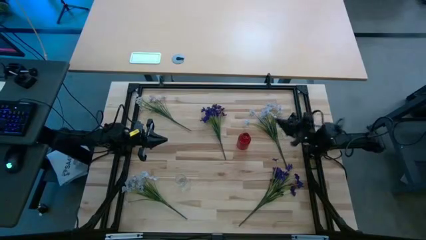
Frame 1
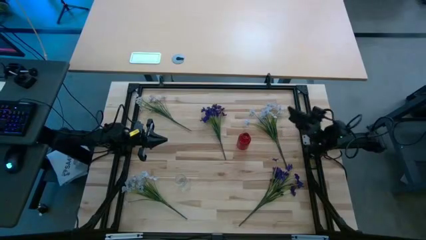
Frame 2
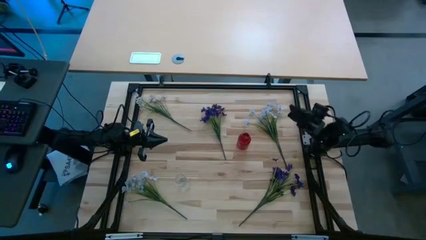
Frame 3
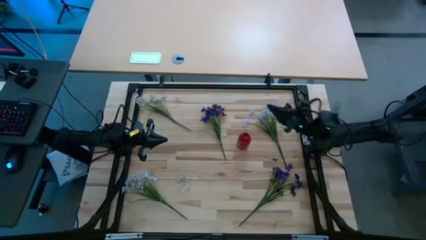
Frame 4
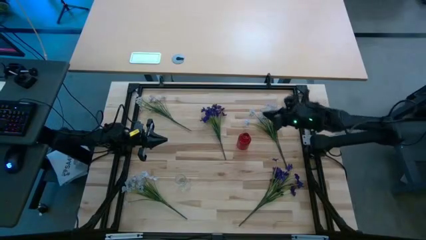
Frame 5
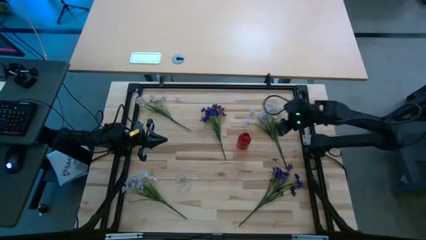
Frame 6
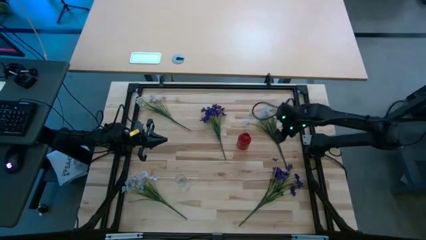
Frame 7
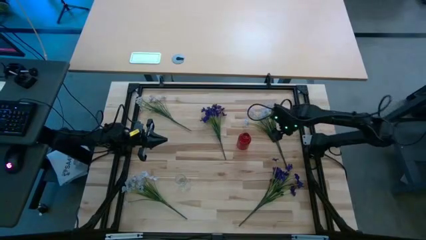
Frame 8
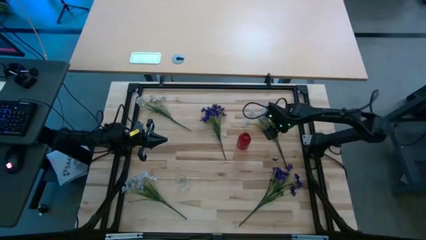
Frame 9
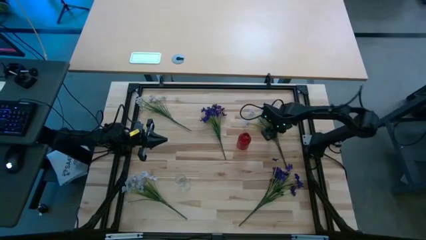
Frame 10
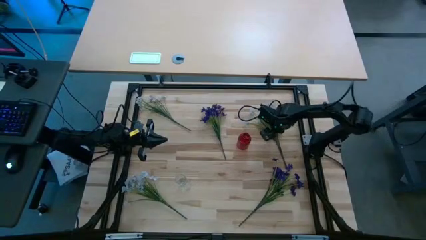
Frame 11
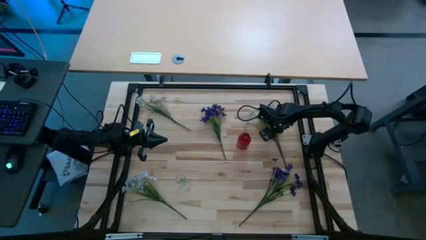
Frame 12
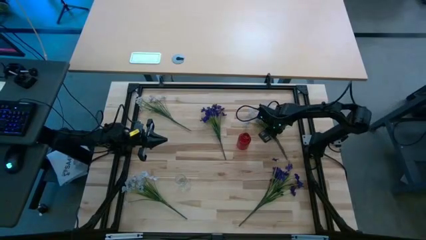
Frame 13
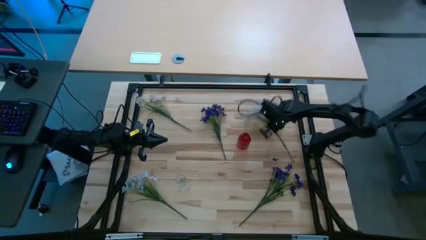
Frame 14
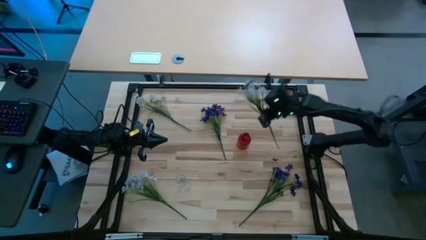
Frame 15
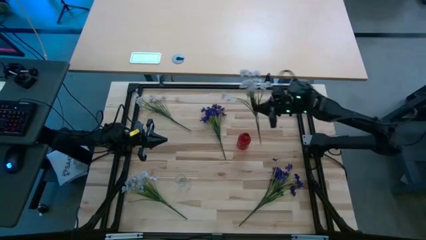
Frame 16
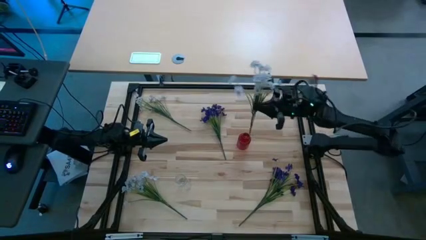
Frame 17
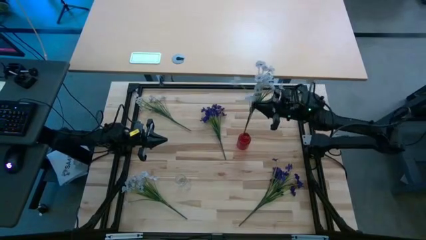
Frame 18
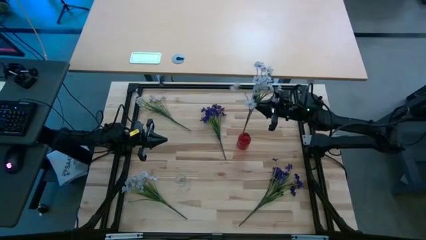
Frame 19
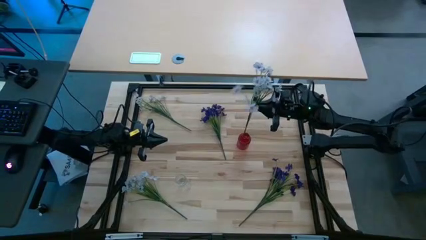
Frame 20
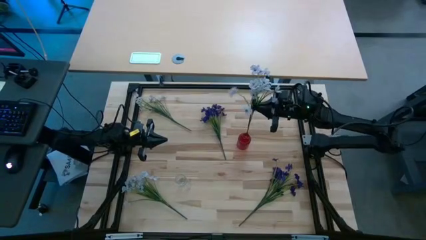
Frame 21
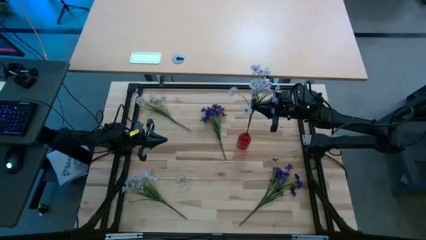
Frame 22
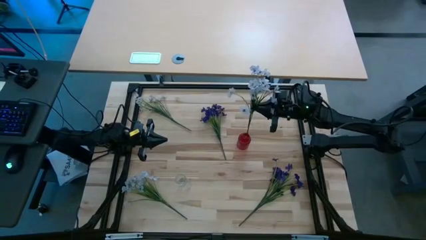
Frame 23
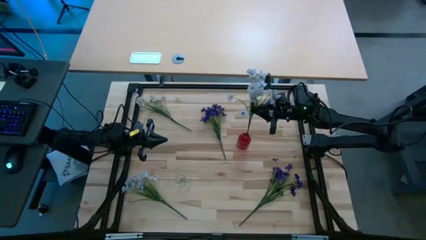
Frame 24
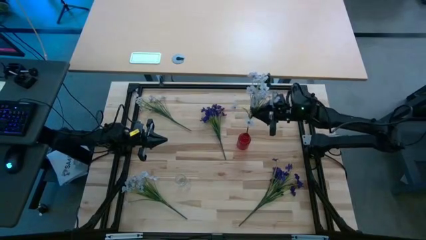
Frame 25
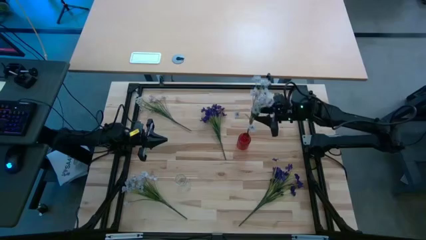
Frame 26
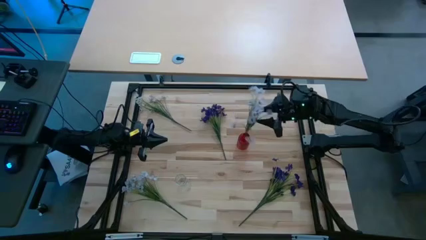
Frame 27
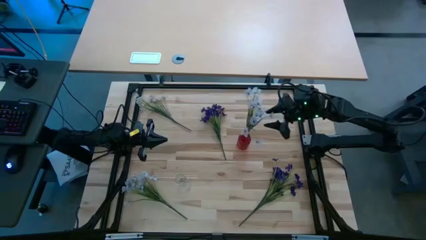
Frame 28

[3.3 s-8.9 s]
Task: Sort flowers into vase by color
Put the top right white flowers into the red vase

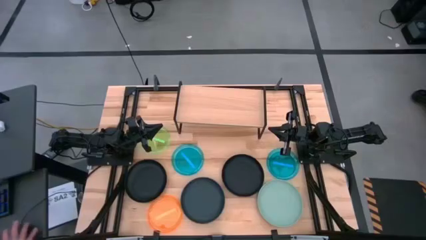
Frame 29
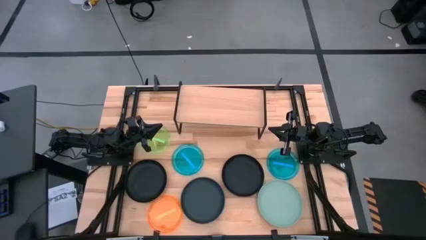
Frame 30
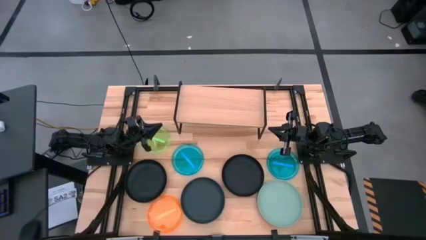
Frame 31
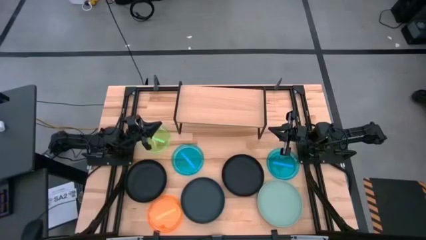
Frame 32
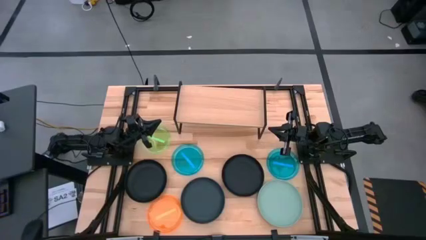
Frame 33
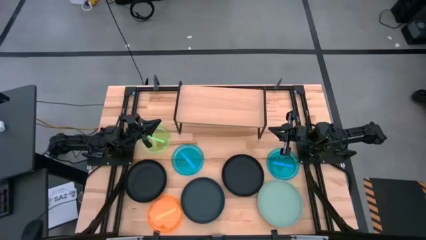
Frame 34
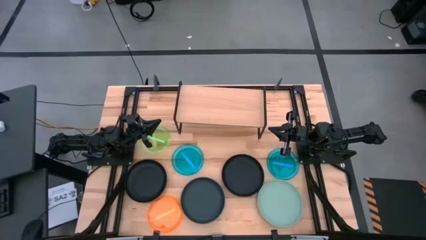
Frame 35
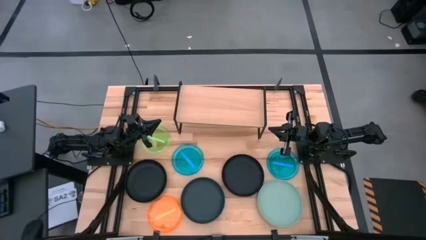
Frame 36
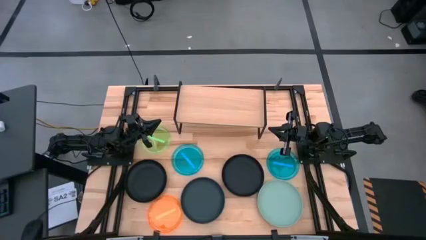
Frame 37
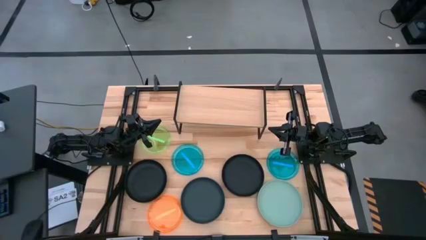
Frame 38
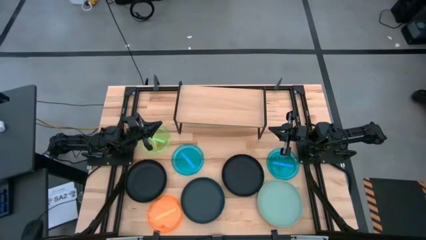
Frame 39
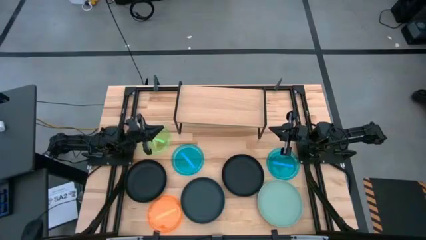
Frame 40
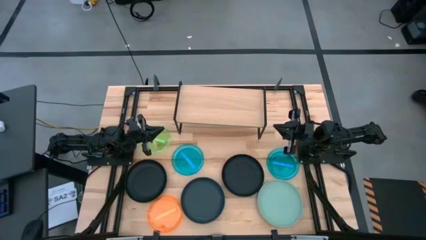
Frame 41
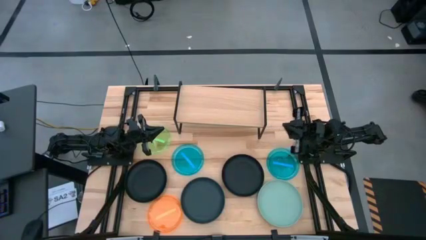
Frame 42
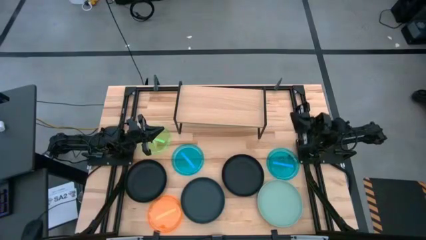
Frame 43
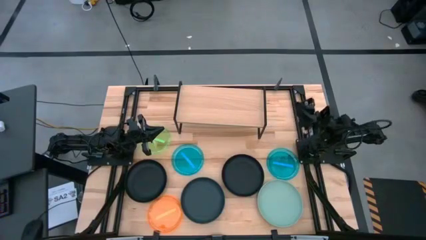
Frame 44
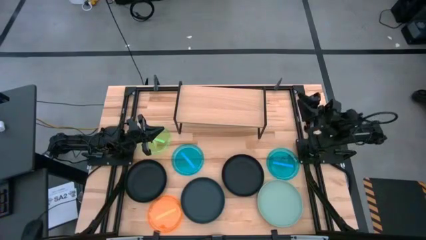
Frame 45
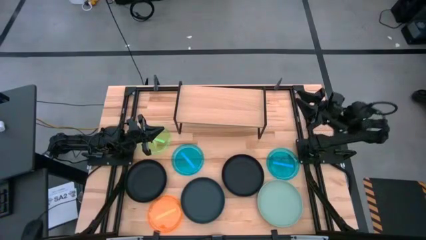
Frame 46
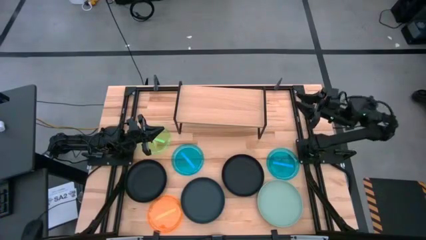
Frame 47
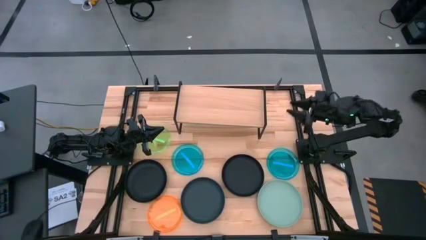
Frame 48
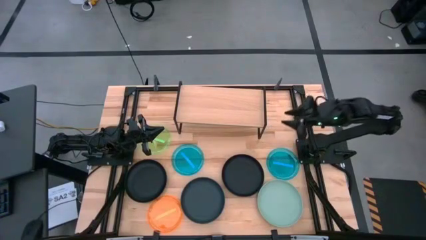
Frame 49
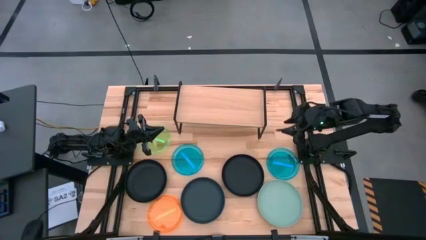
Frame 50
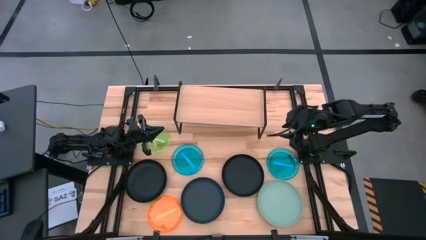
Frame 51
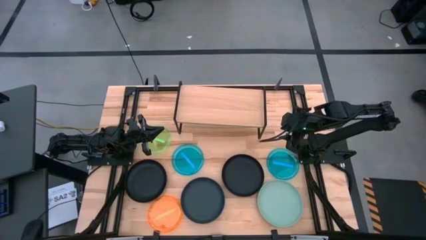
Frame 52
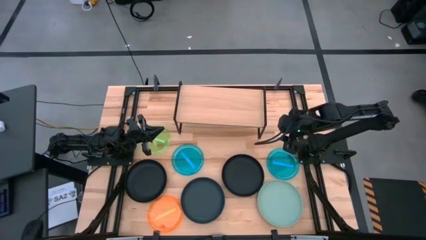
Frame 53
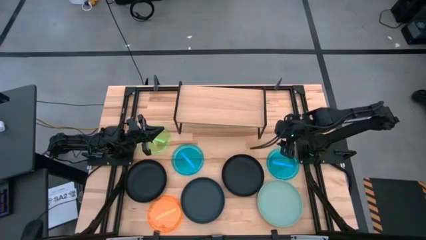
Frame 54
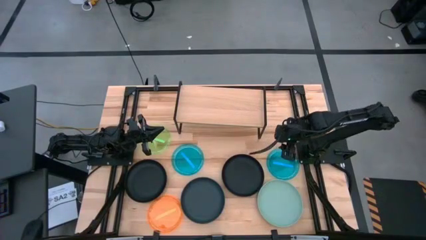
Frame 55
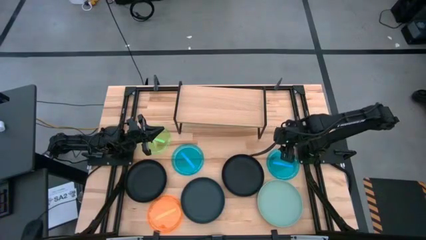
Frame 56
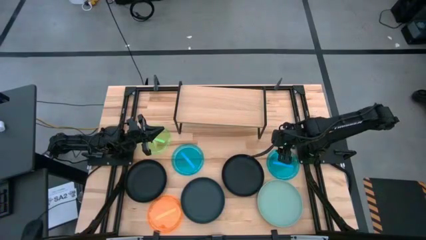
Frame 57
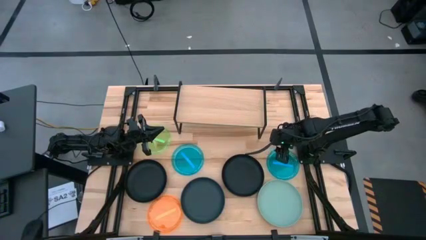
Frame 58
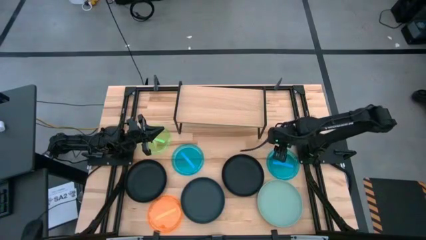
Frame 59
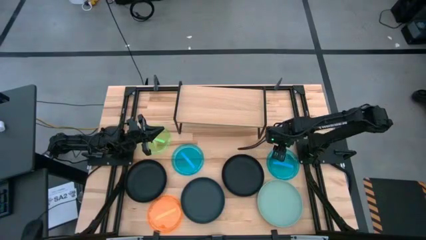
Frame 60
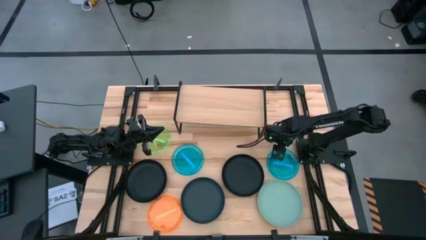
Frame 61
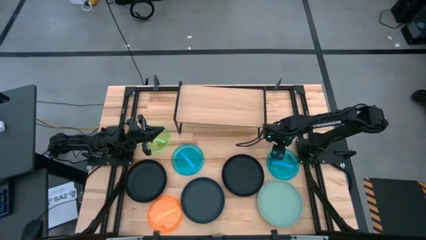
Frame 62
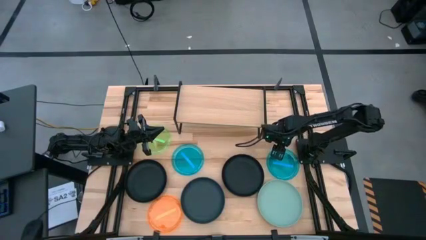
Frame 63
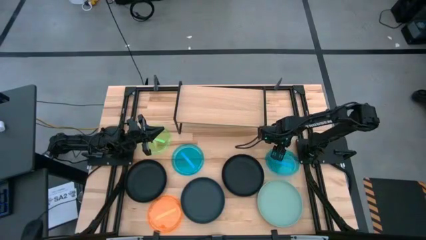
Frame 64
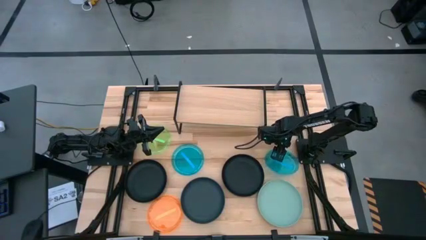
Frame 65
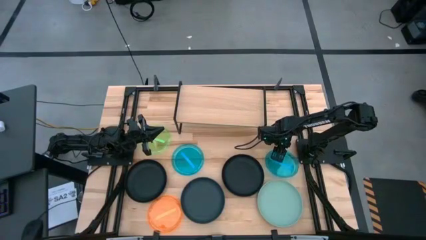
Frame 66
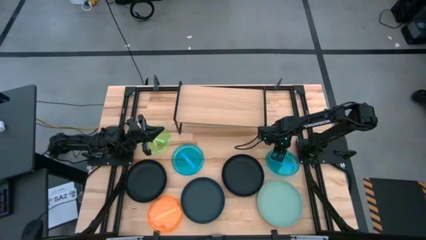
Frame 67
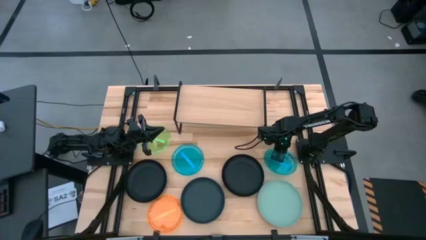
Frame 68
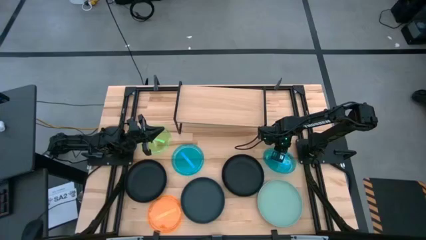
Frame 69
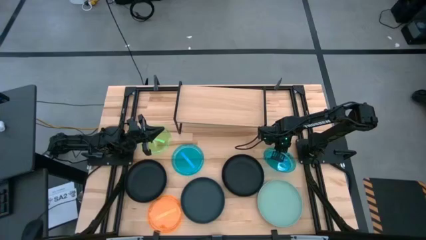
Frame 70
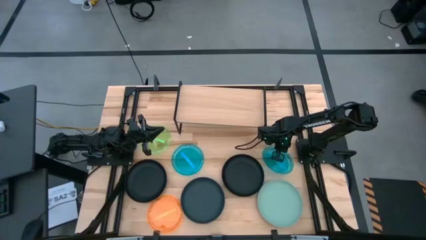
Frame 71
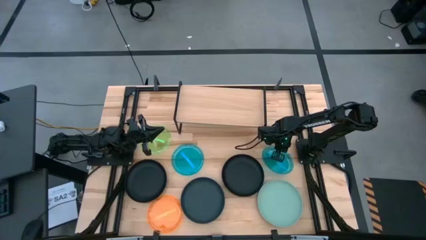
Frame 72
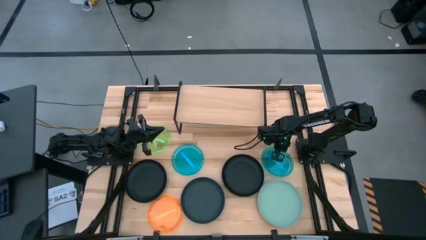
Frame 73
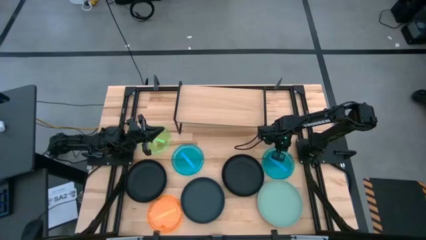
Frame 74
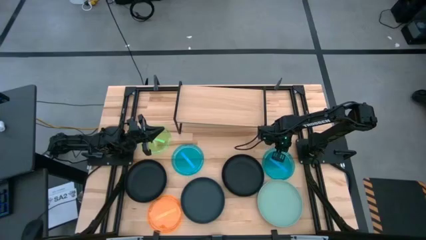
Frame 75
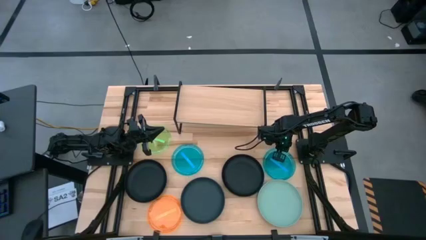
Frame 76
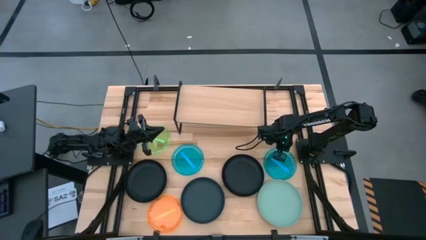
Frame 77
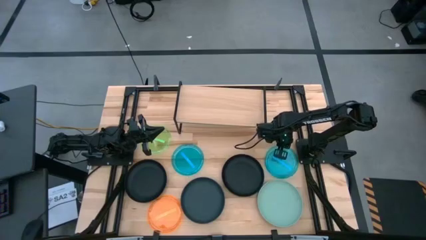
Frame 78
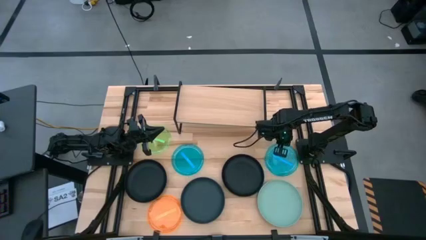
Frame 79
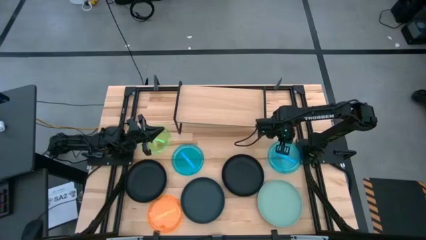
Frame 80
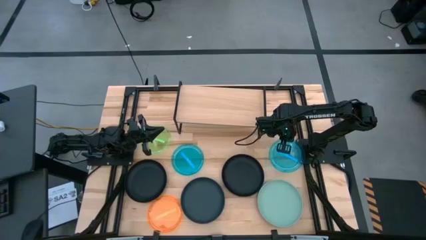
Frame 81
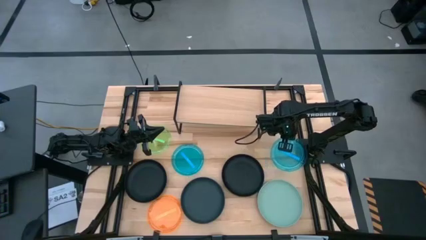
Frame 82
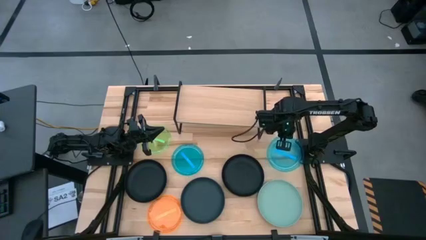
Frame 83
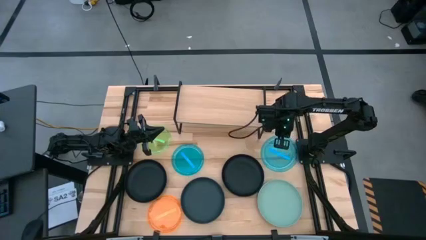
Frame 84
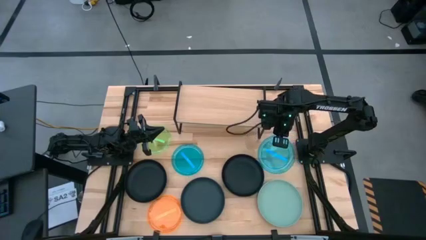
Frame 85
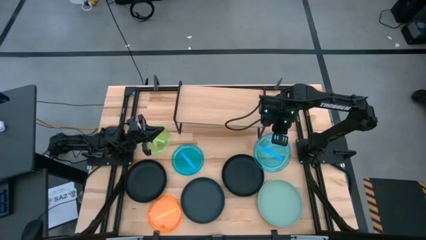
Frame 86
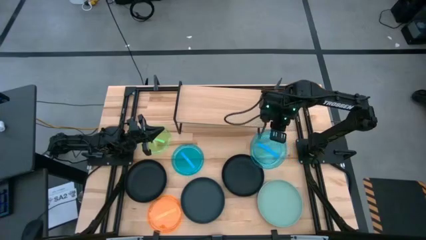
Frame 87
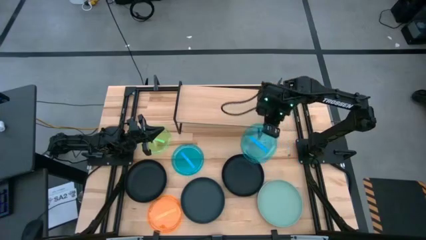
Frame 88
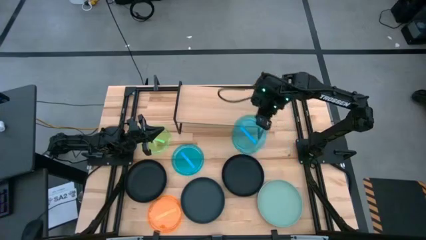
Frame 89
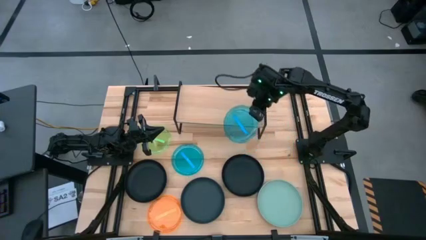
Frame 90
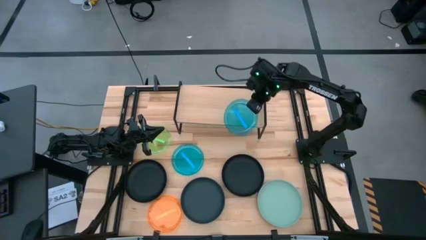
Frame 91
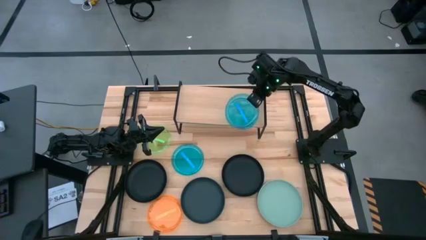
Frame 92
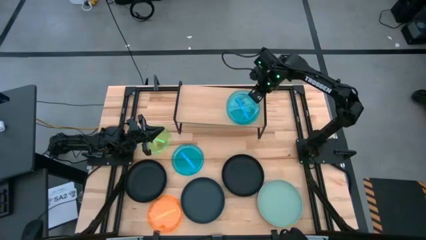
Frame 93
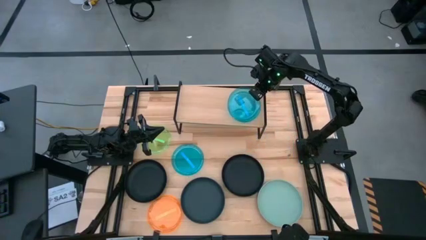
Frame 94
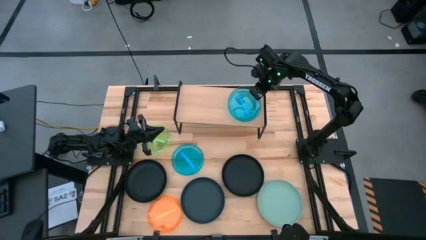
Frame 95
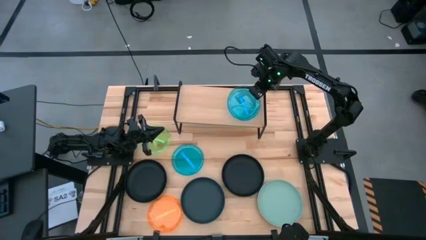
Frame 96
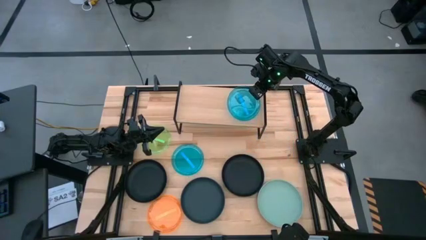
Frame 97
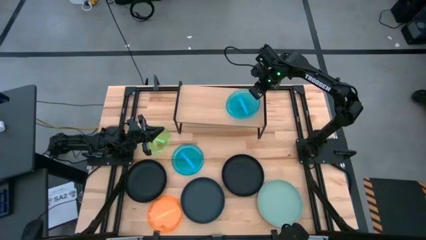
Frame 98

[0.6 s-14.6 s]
Task: Place and stack plates onto a shelf
Put the right blue plate on the shelf
